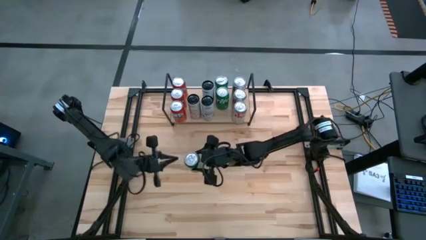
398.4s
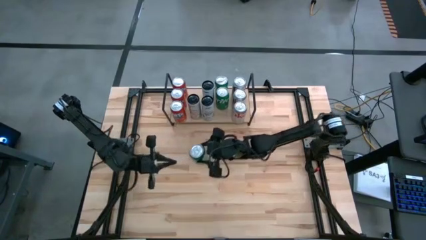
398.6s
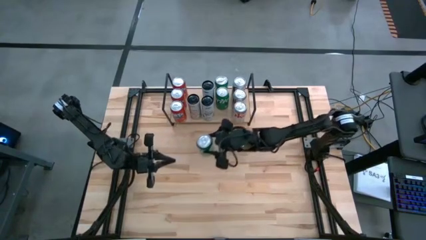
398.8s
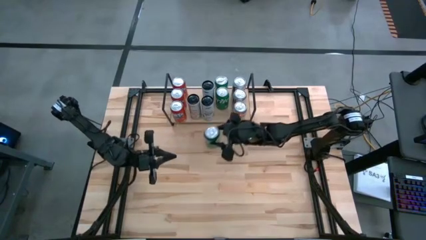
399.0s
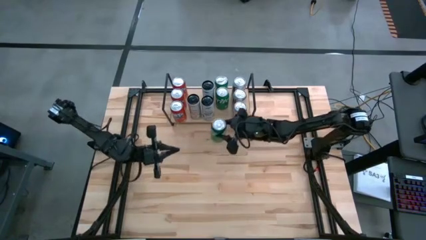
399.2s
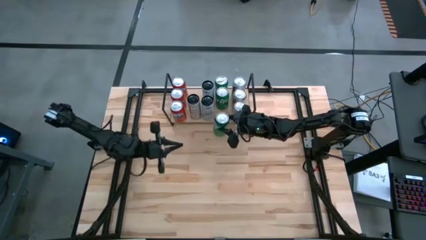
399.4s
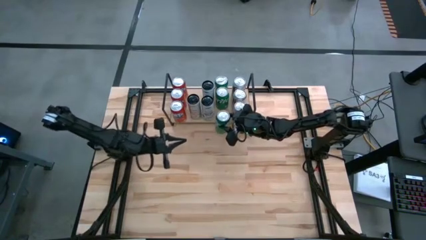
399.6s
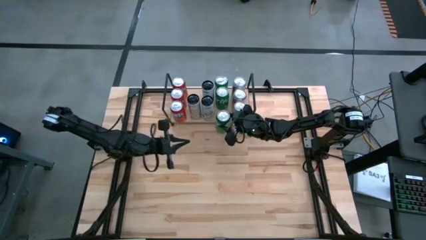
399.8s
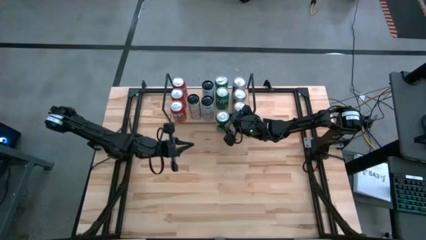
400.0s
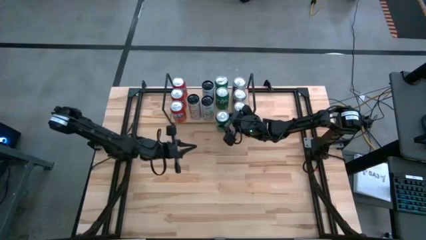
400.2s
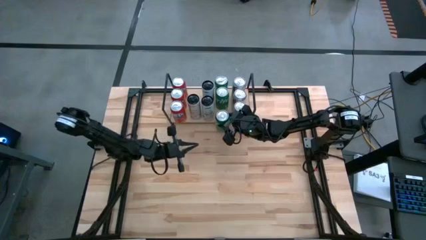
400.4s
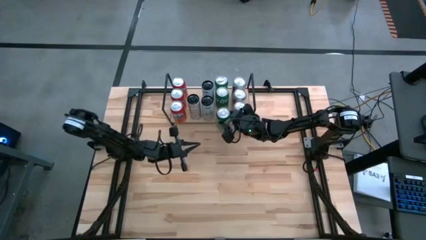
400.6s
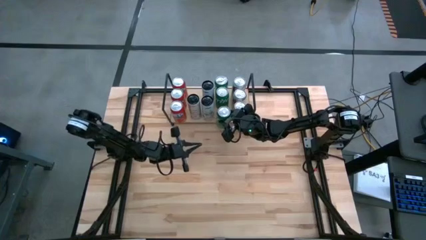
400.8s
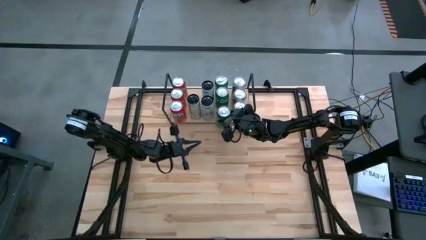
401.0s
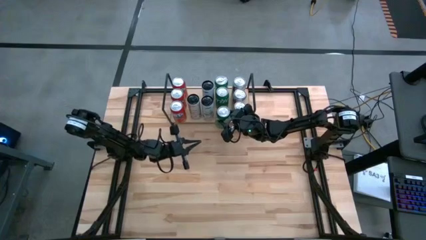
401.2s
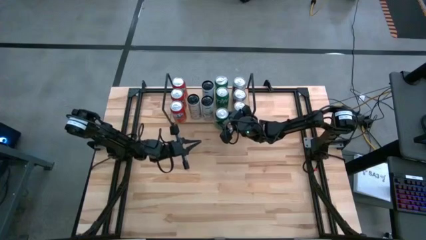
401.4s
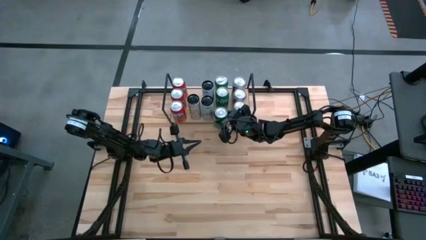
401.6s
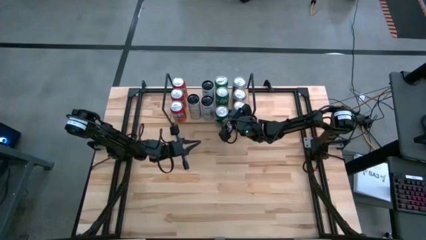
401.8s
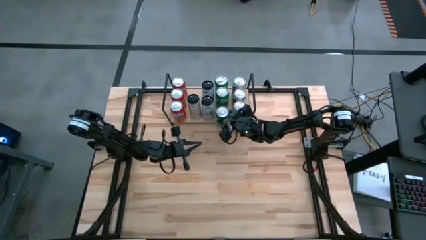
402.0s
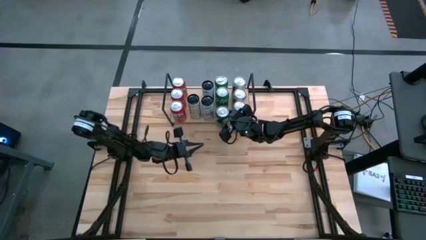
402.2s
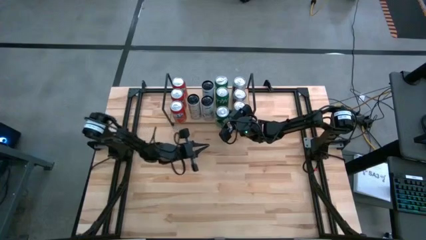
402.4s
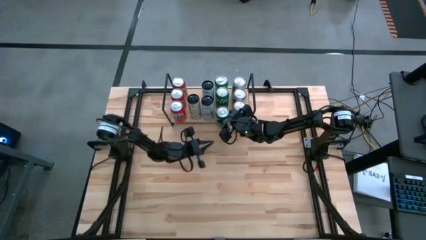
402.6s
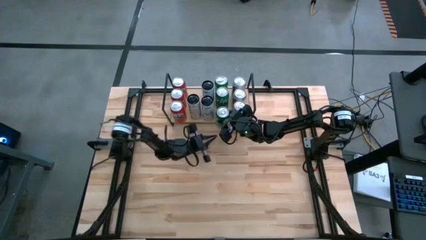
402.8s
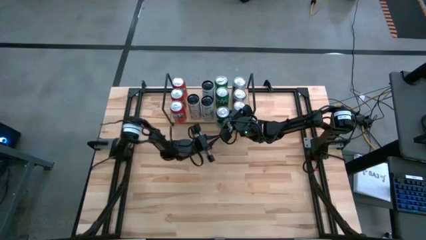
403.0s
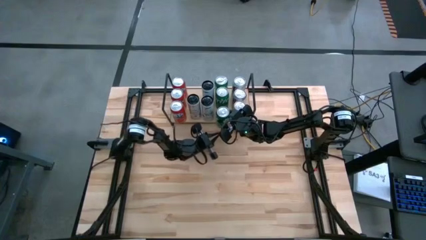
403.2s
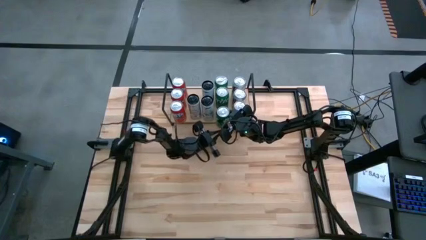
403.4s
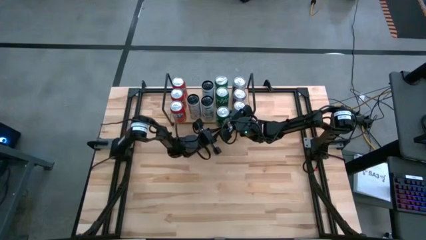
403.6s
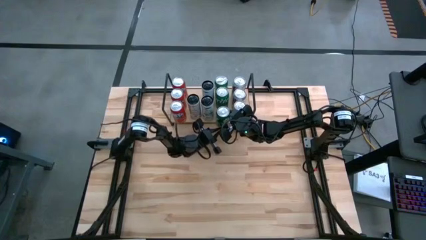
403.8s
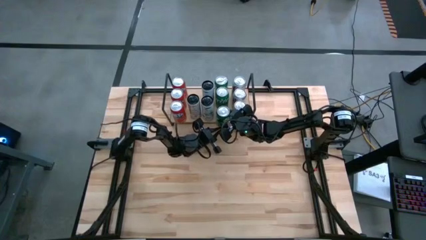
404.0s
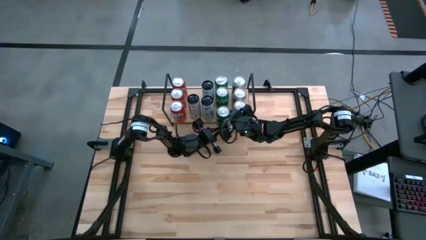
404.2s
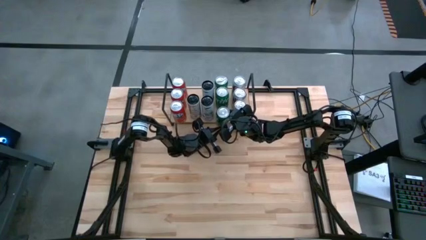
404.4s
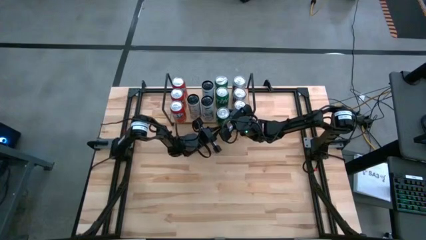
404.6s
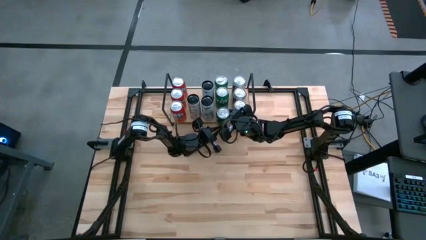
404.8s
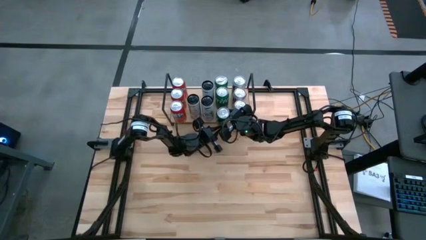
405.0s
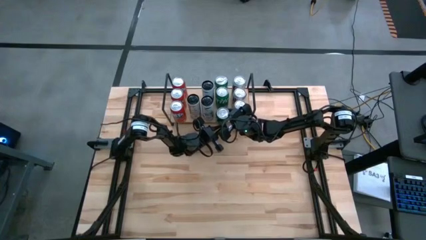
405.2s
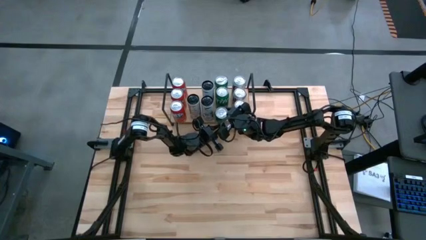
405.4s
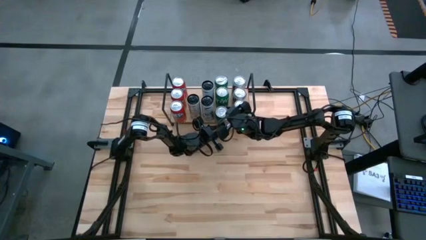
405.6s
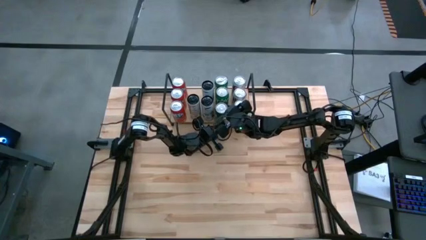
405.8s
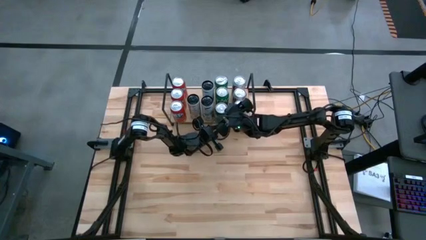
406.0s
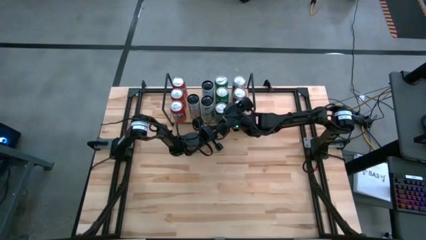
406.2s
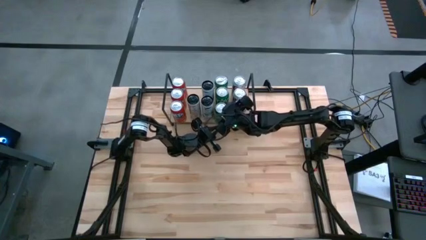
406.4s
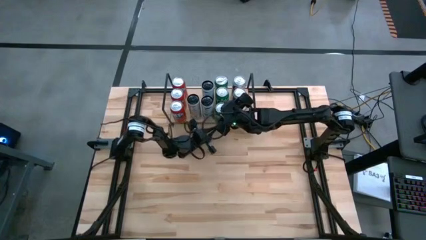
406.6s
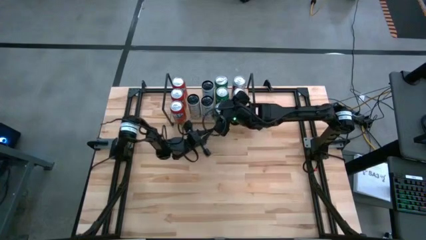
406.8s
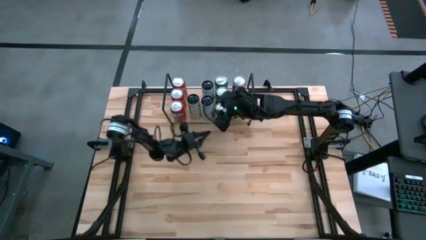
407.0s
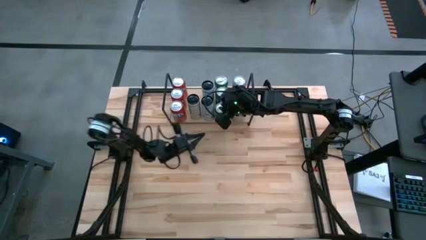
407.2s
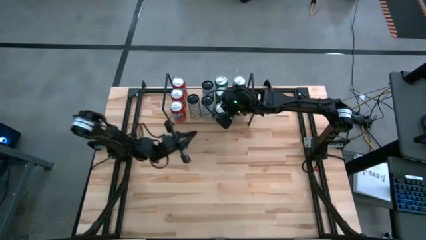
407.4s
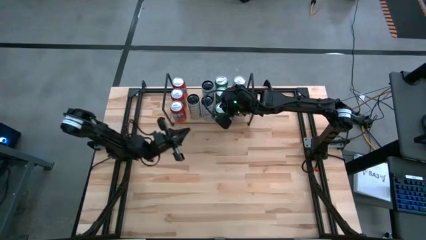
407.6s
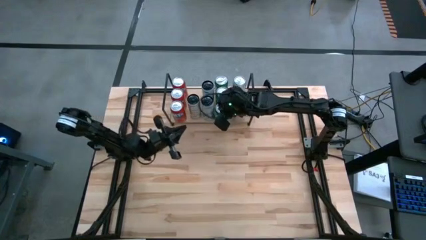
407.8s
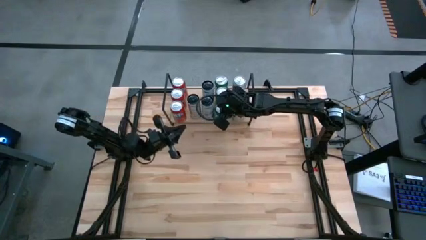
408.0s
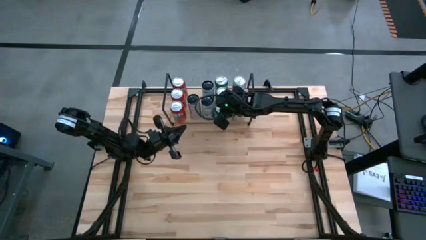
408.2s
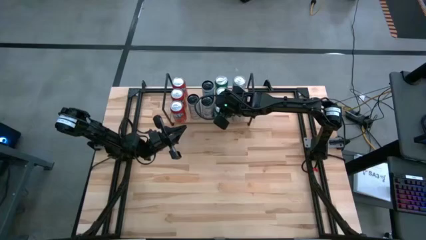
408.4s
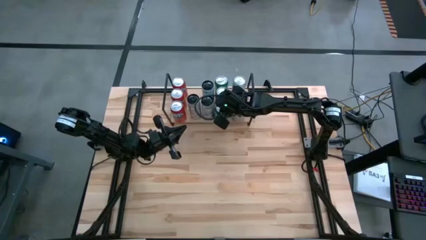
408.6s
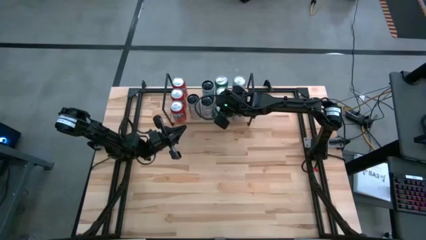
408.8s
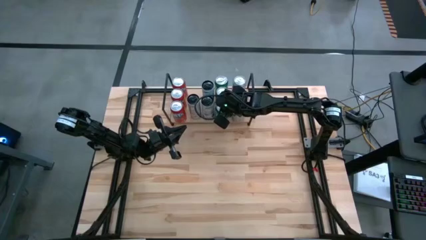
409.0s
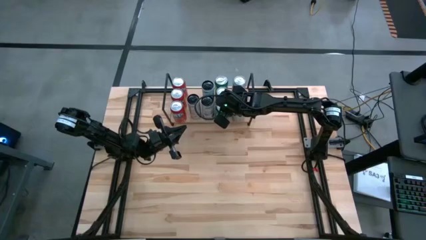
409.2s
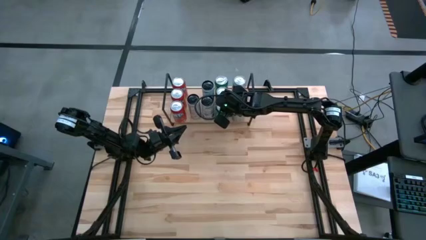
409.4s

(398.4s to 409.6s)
Task: Sort soda cans
Put the green soda can on the shelf and align it with the other green soda cans
